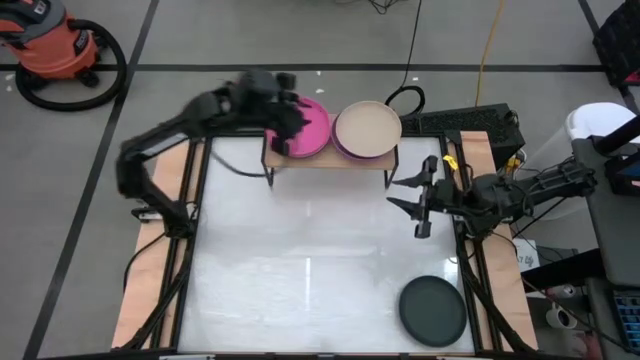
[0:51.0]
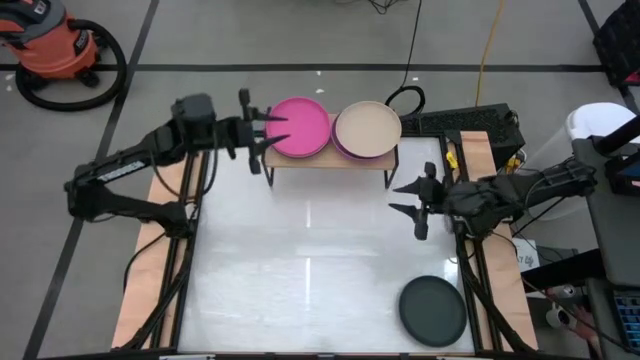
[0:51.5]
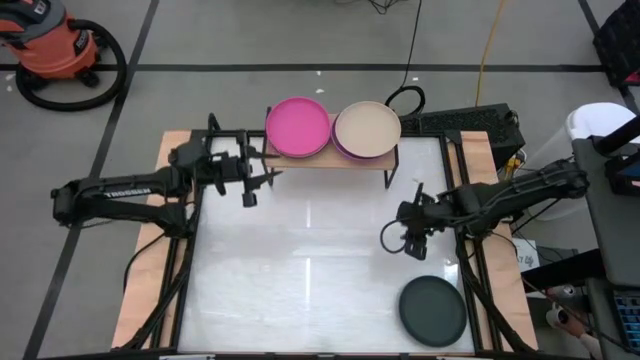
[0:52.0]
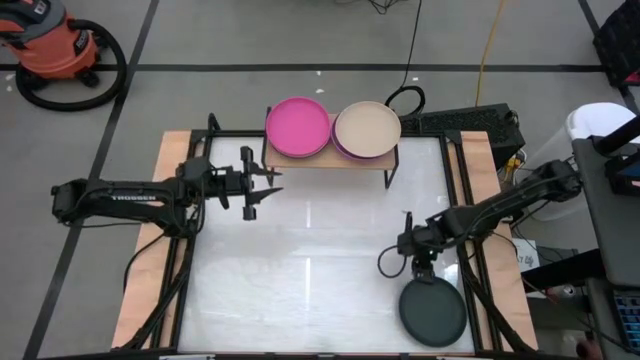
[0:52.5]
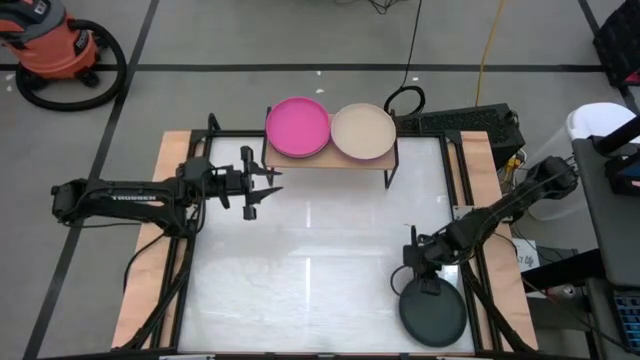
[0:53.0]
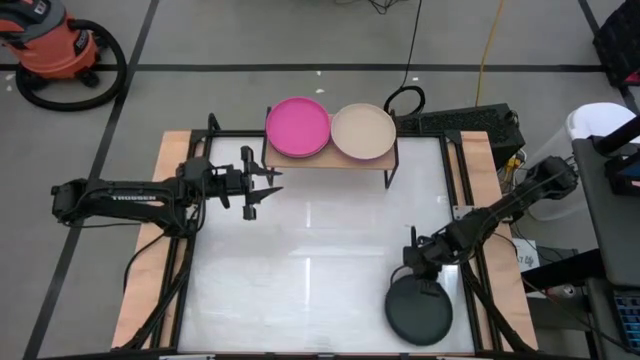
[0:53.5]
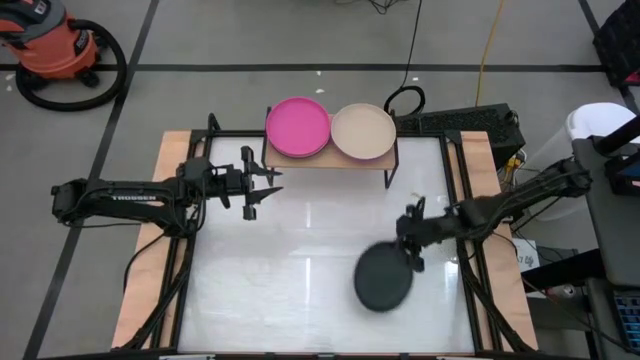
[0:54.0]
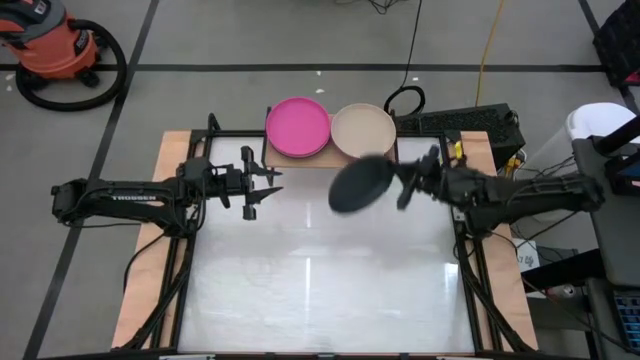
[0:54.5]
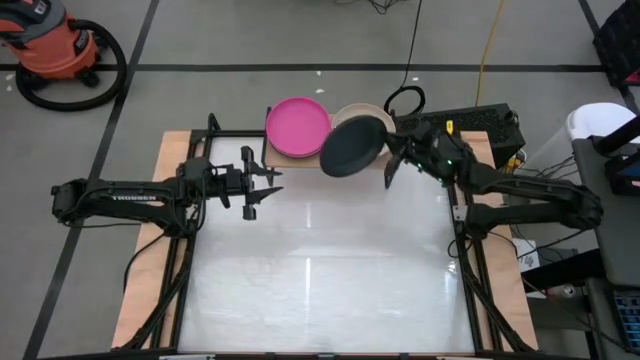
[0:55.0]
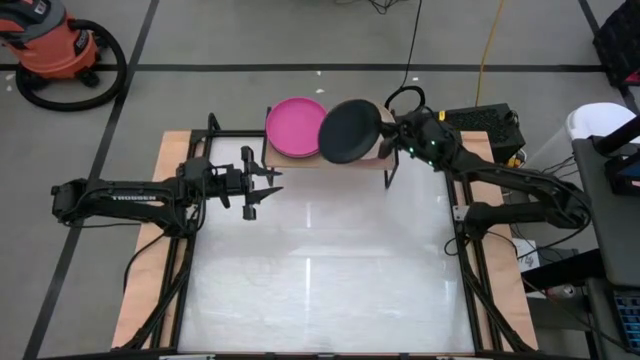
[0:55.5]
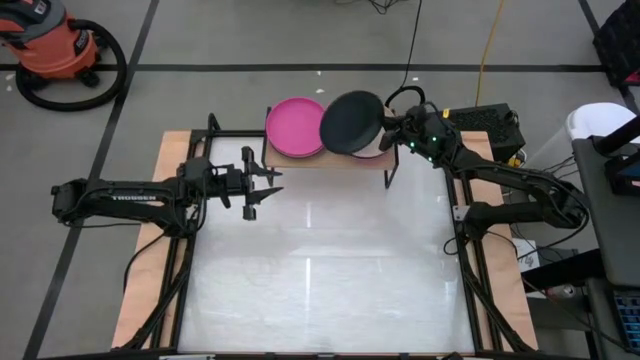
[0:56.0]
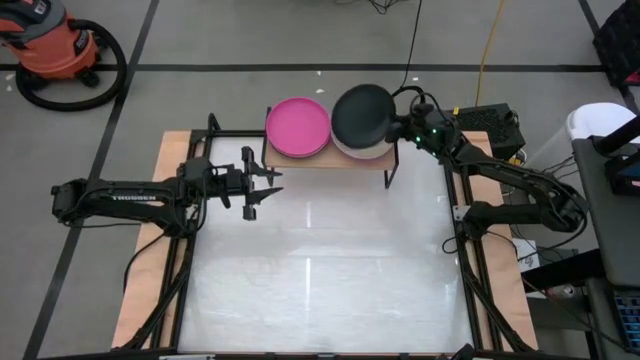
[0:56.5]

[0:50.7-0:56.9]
Task: Place and stack plates onto a shelf
Stack the black plate on top of the light brown plate on the shelf

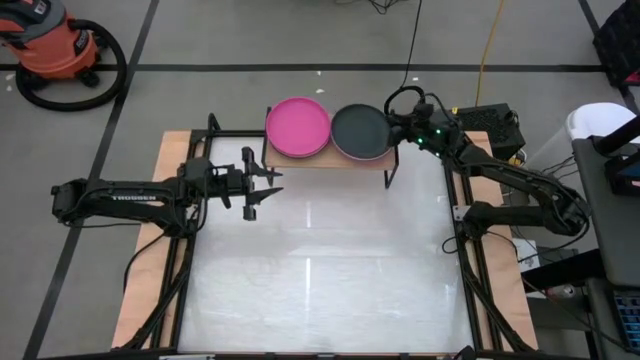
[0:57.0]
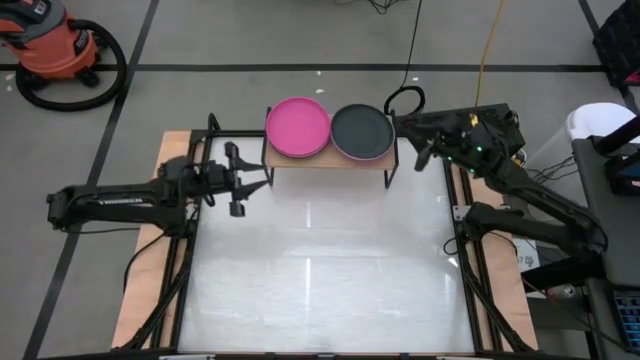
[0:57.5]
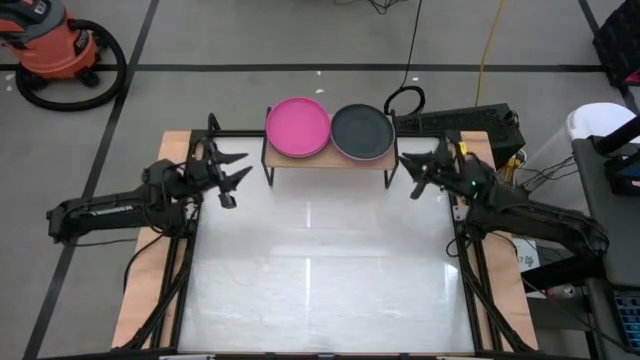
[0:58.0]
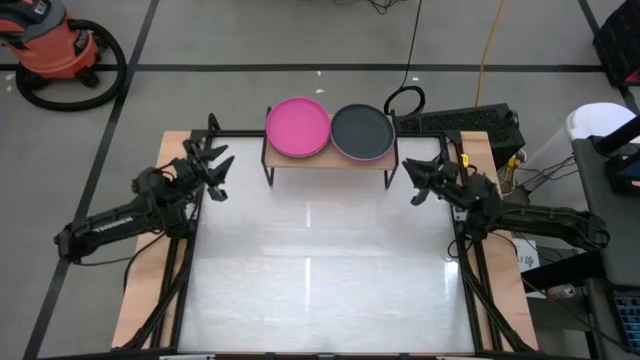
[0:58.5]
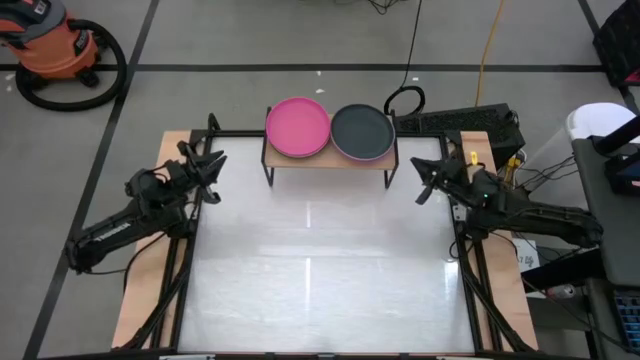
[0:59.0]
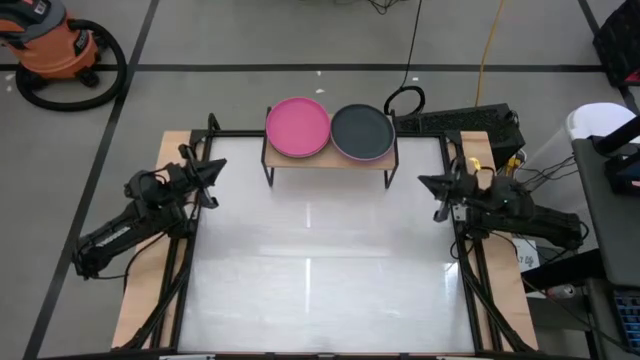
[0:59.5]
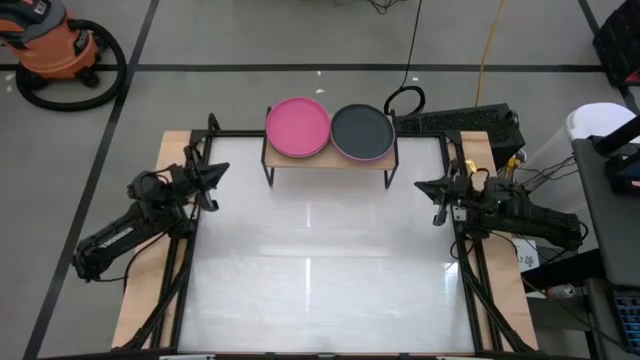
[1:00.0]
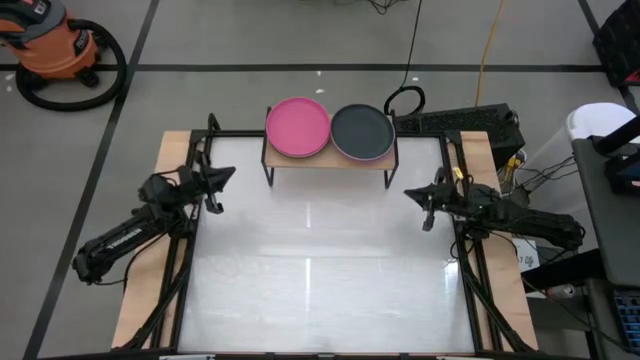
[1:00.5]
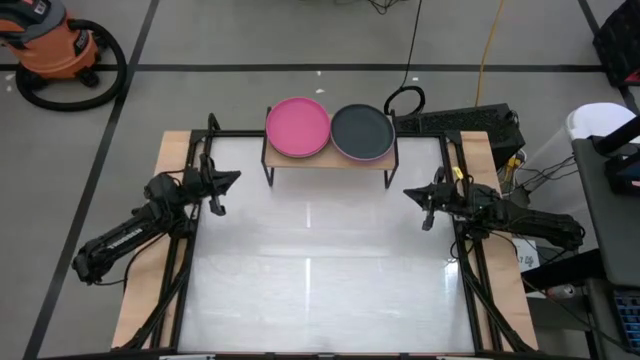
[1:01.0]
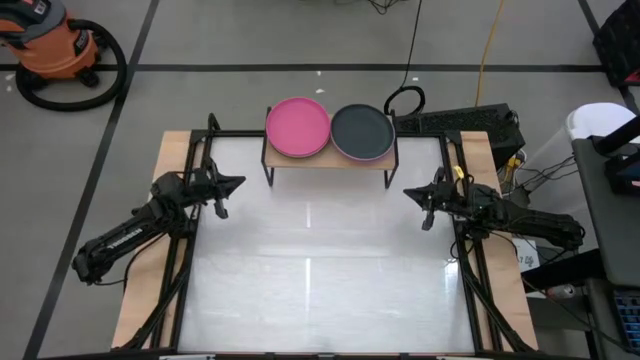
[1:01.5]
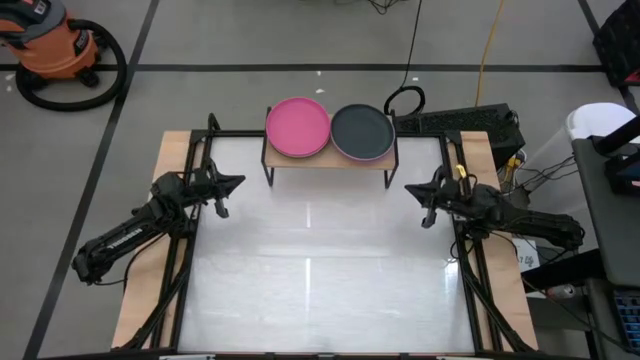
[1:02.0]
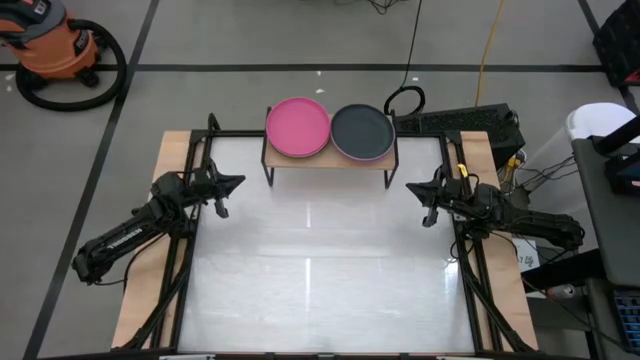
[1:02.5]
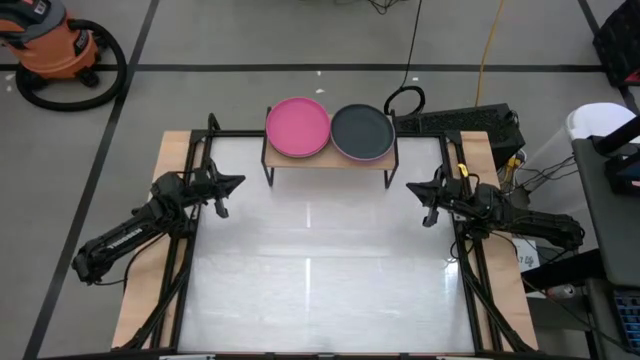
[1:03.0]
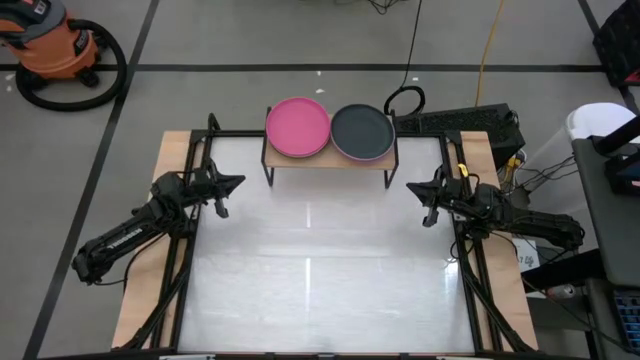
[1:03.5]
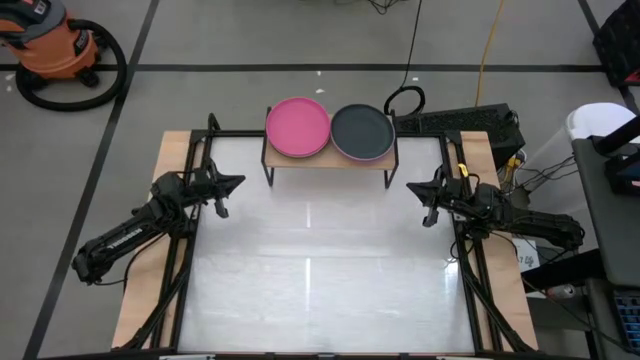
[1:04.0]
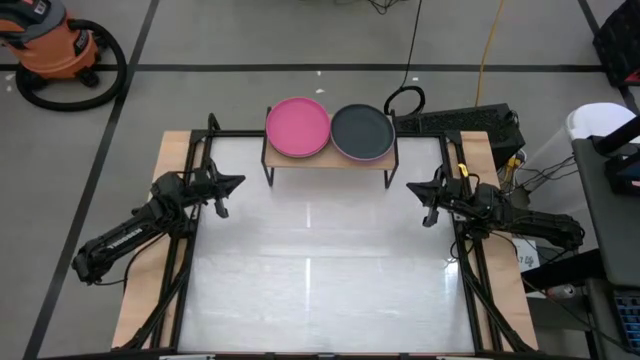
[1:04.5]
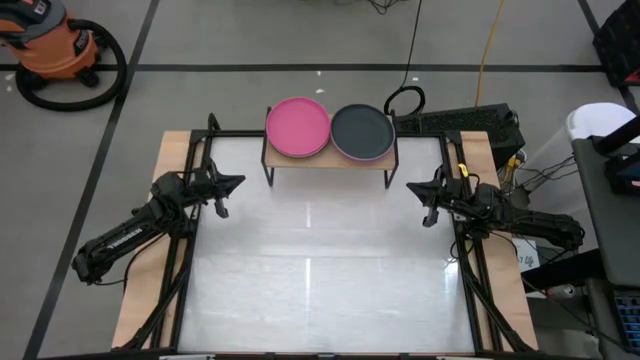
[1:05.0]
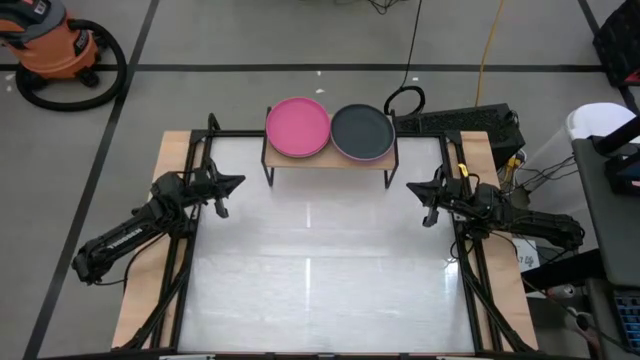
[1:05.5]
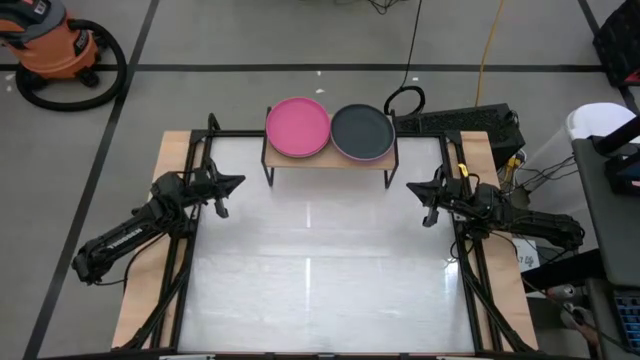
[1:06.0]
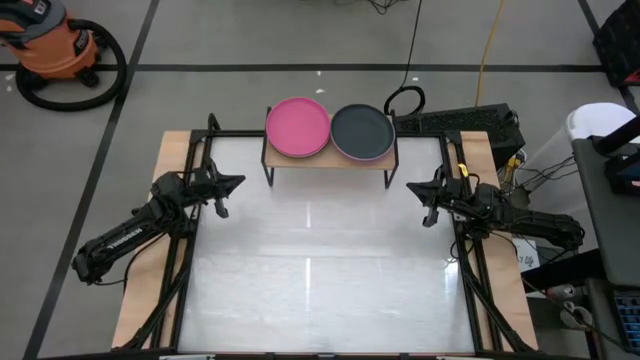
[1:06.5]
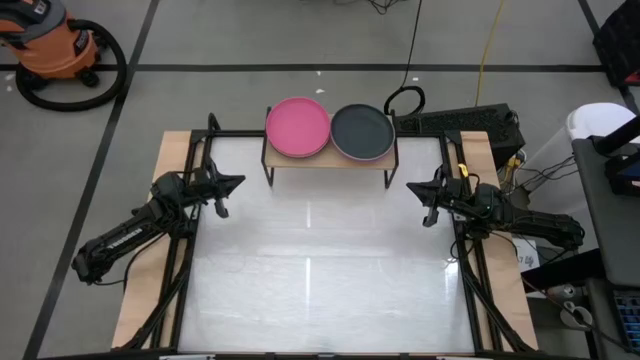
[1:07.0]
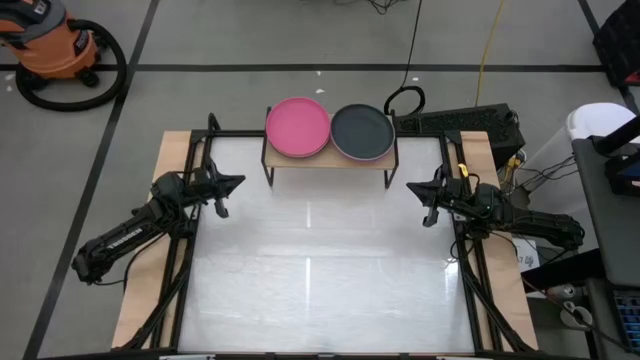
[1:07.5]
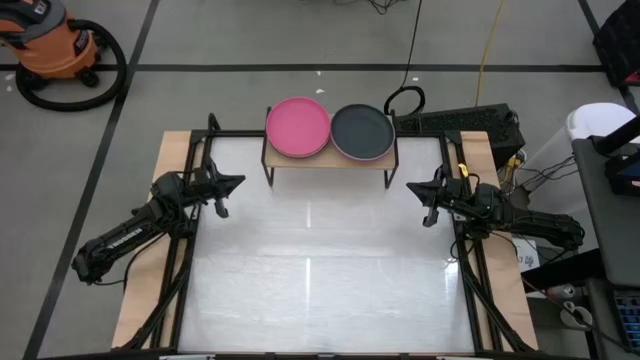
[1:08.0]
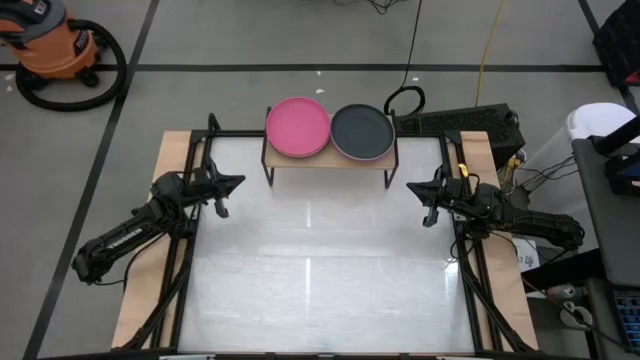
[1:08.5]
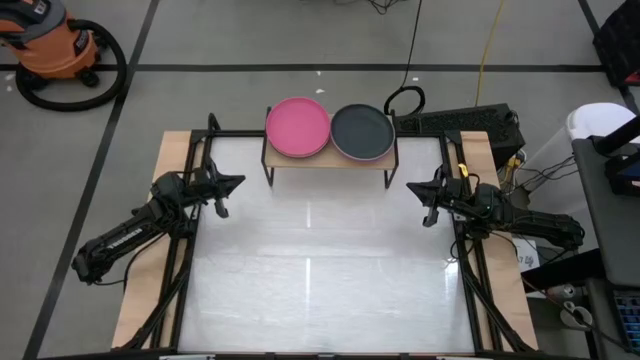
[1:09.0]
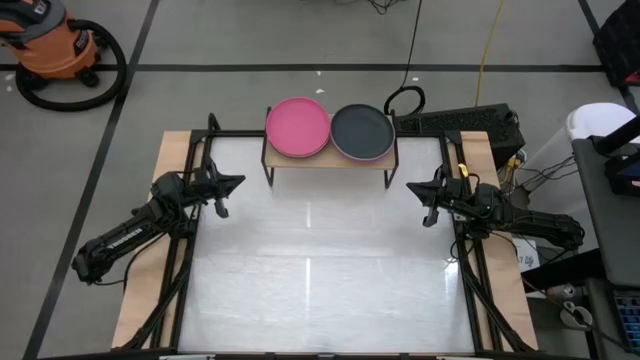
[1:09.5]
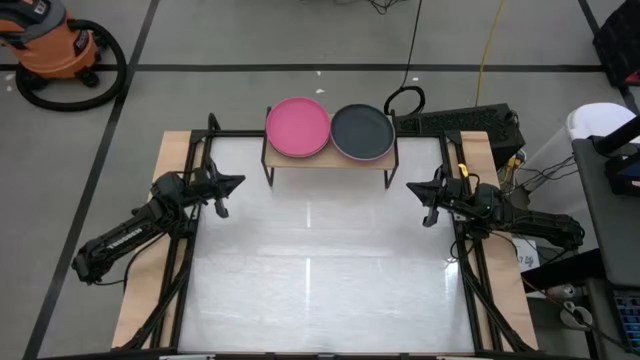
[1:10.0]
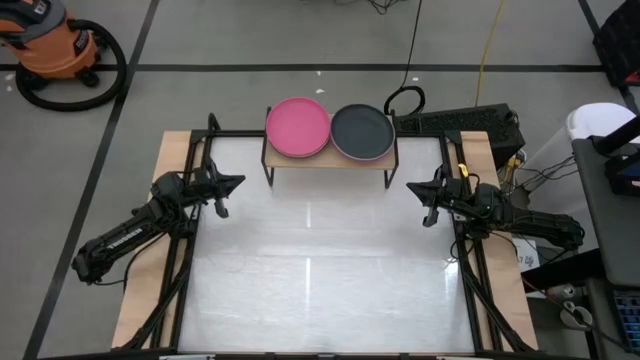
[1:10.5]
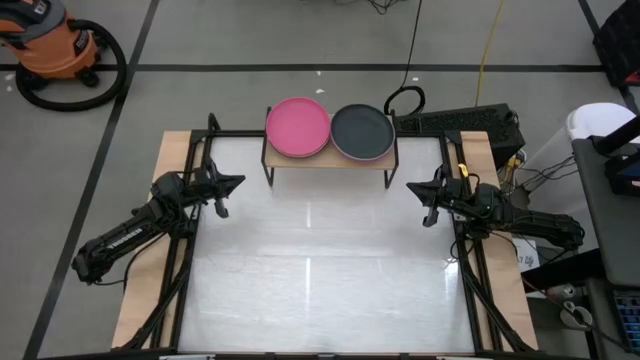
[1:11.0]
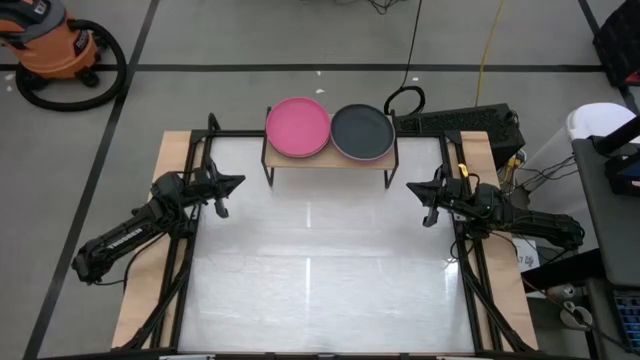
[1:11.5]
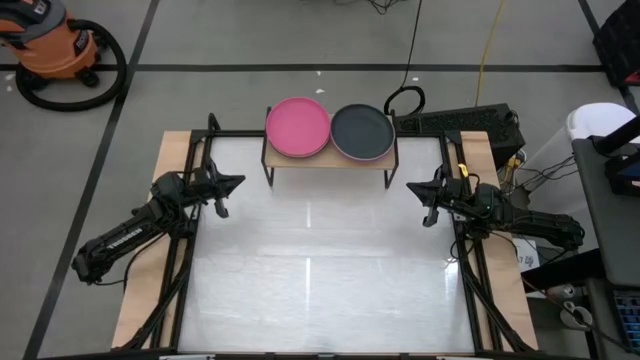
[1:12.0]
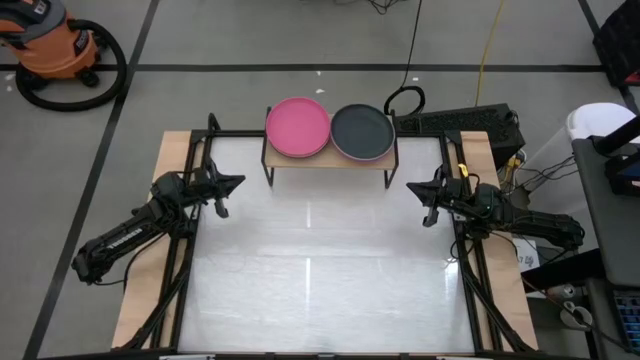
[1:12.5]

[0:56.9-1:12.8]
Return to Home Position
